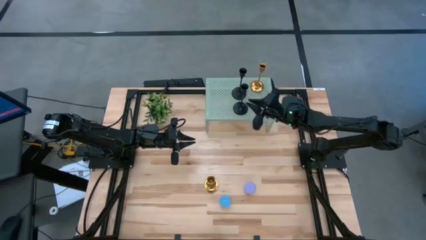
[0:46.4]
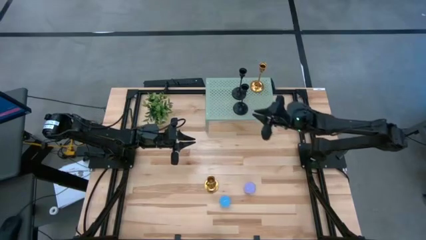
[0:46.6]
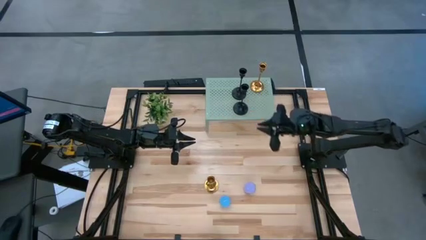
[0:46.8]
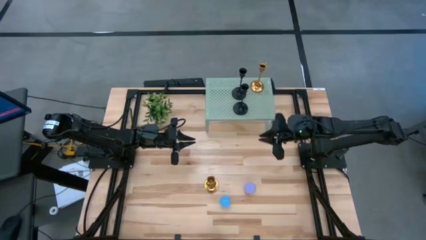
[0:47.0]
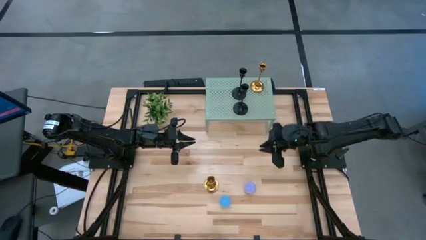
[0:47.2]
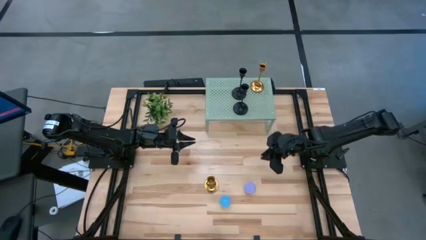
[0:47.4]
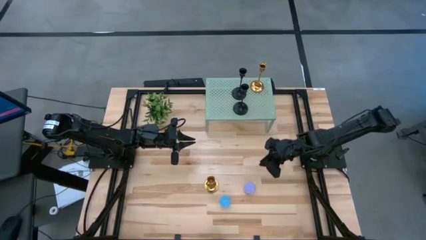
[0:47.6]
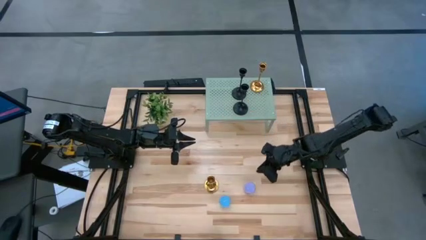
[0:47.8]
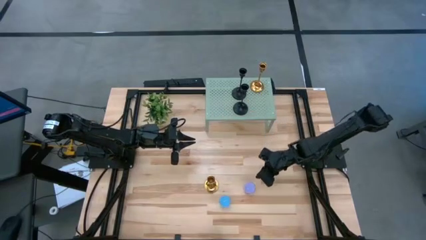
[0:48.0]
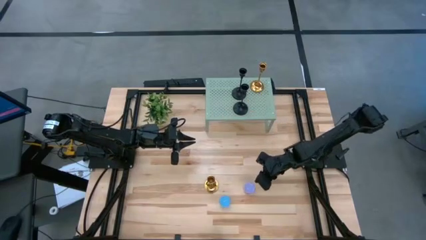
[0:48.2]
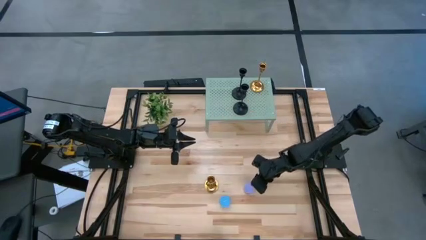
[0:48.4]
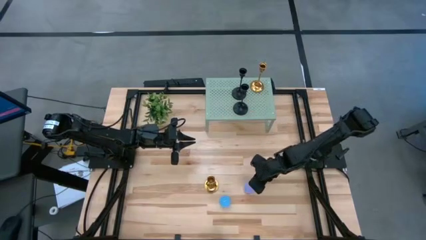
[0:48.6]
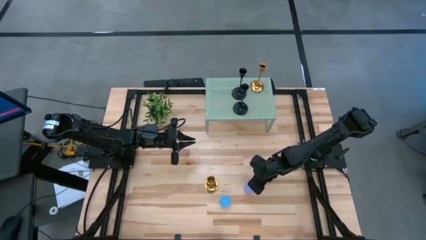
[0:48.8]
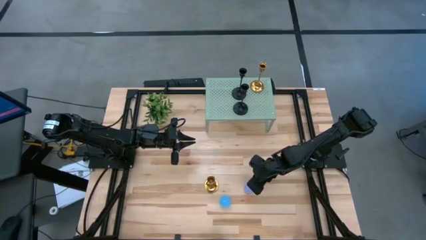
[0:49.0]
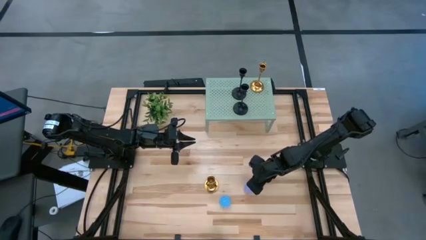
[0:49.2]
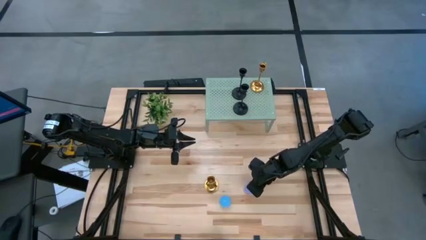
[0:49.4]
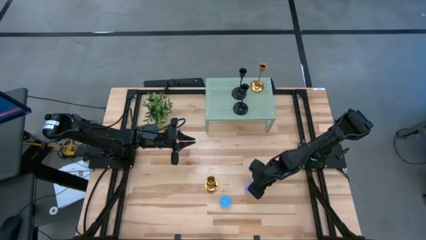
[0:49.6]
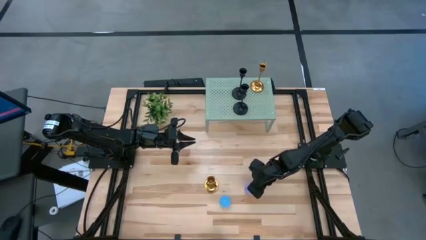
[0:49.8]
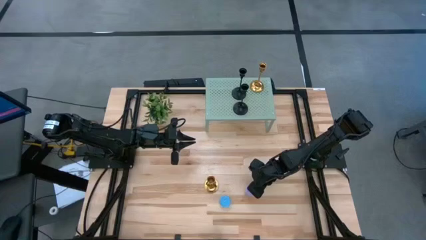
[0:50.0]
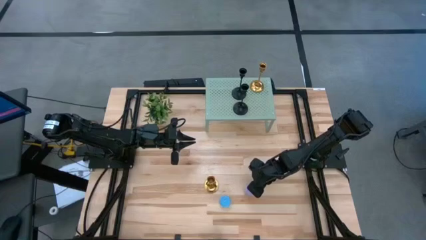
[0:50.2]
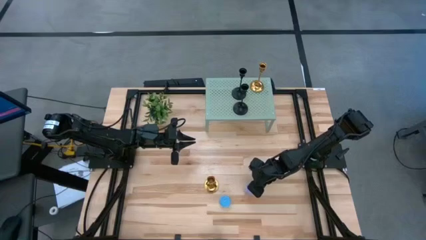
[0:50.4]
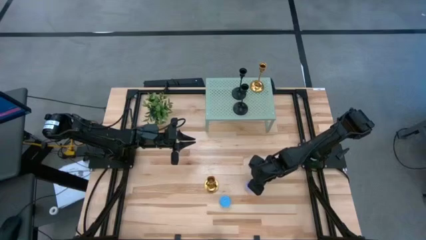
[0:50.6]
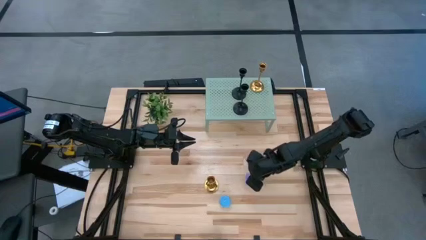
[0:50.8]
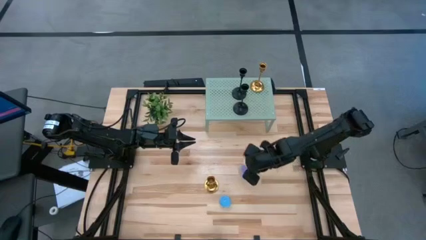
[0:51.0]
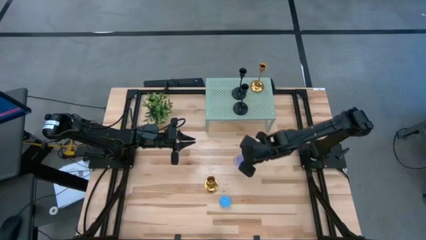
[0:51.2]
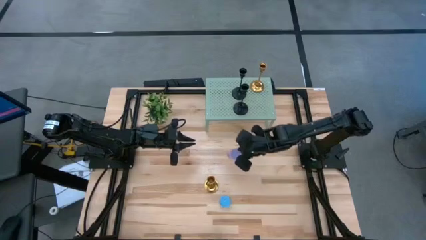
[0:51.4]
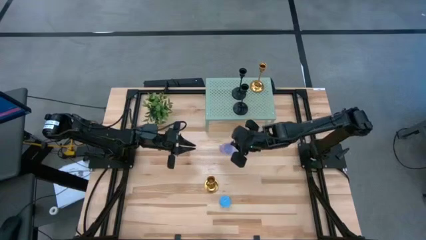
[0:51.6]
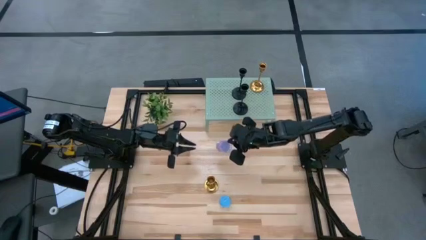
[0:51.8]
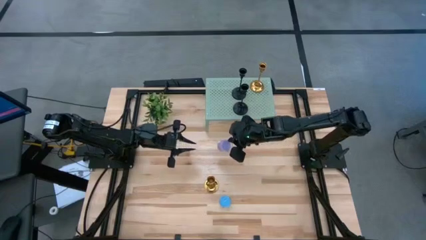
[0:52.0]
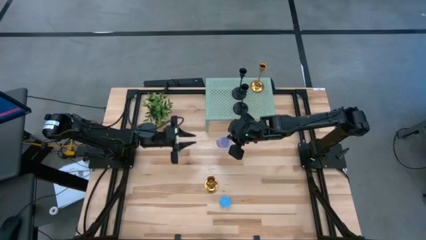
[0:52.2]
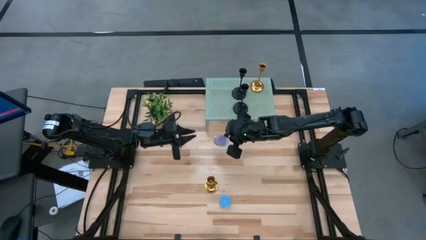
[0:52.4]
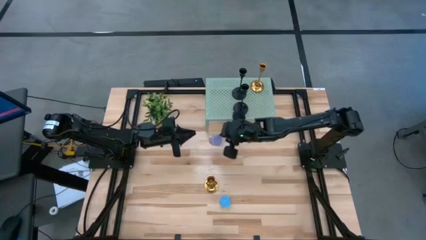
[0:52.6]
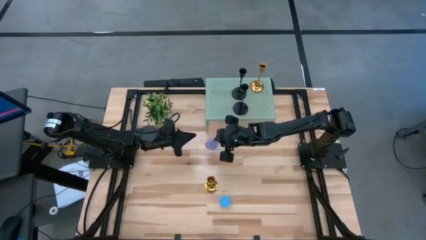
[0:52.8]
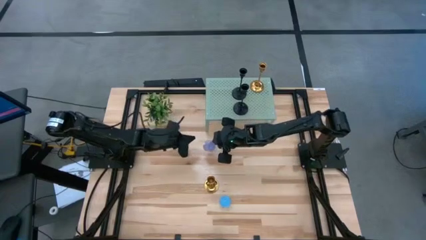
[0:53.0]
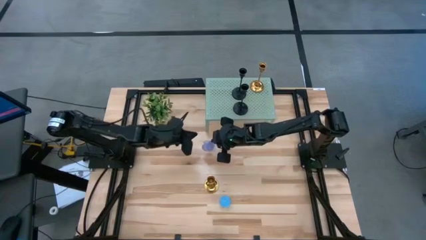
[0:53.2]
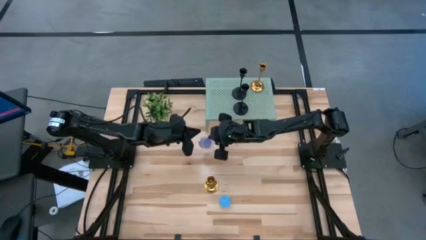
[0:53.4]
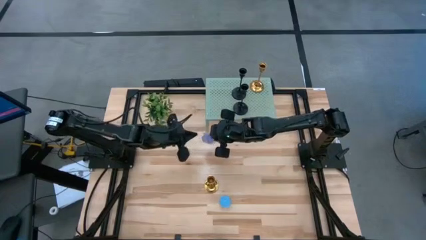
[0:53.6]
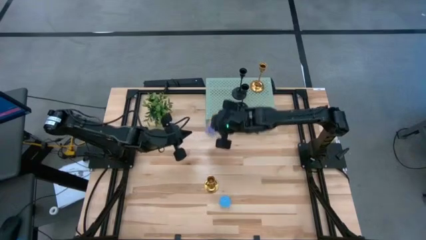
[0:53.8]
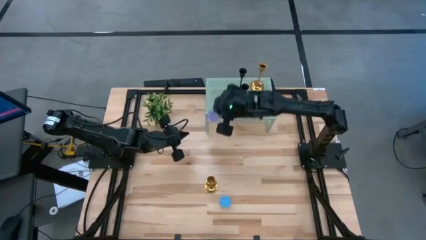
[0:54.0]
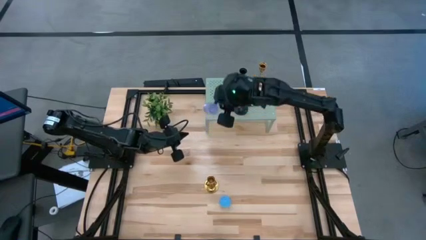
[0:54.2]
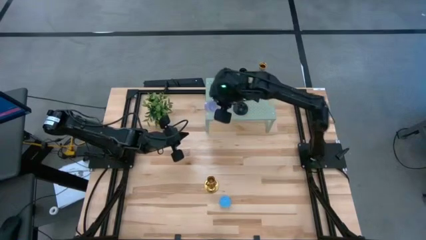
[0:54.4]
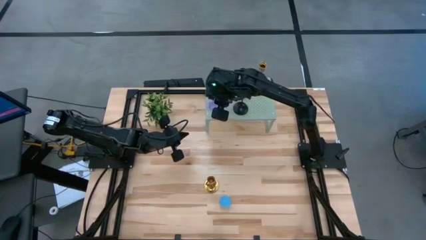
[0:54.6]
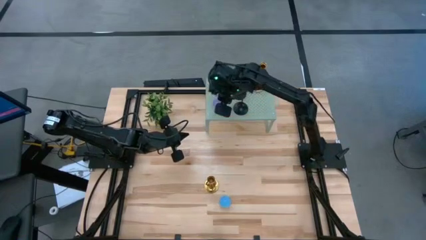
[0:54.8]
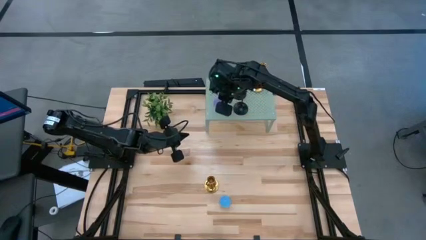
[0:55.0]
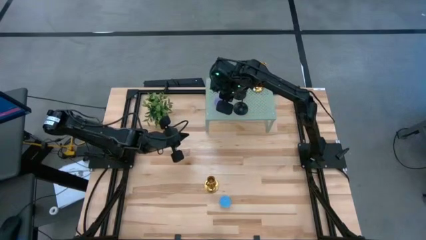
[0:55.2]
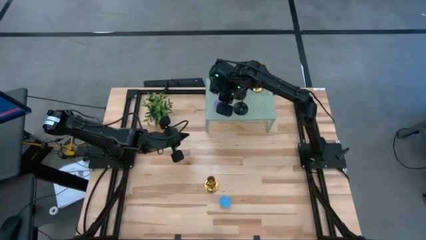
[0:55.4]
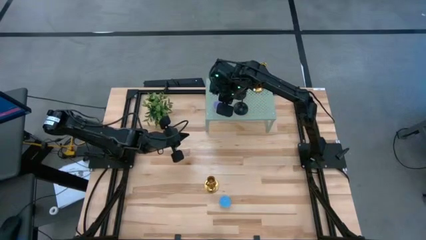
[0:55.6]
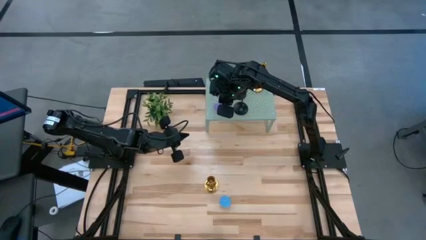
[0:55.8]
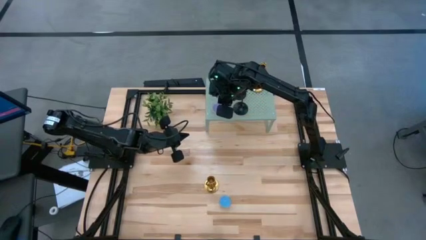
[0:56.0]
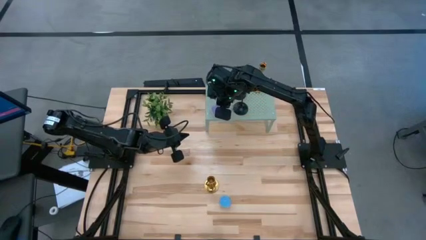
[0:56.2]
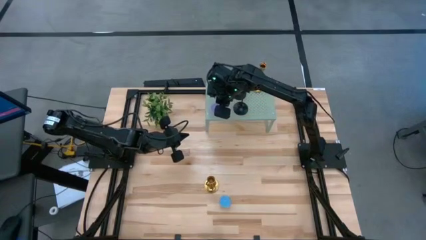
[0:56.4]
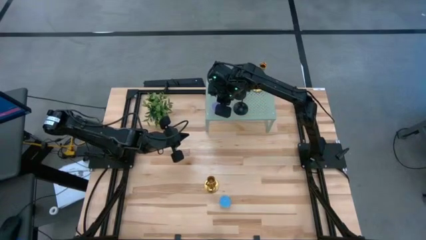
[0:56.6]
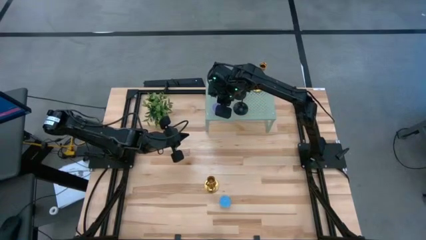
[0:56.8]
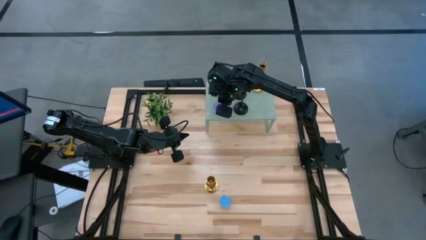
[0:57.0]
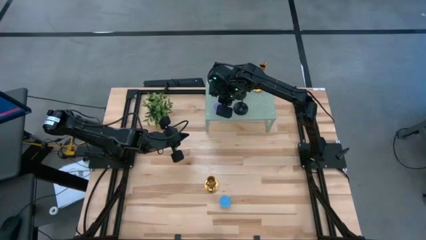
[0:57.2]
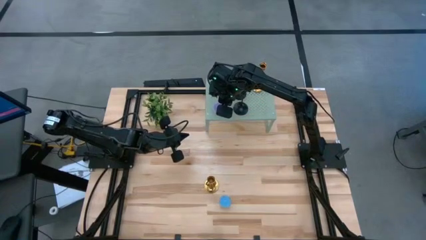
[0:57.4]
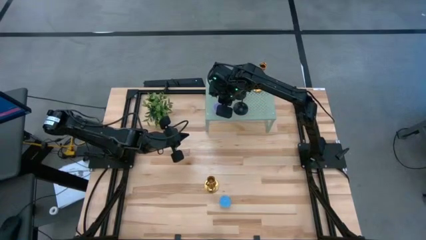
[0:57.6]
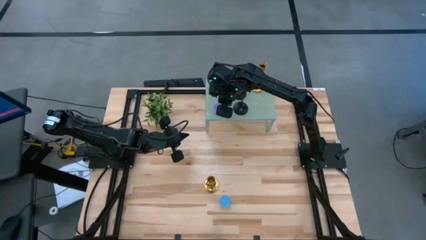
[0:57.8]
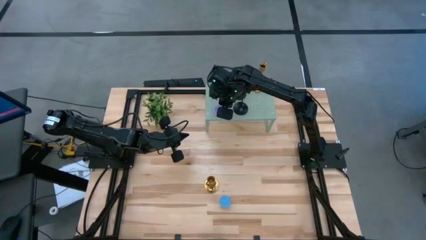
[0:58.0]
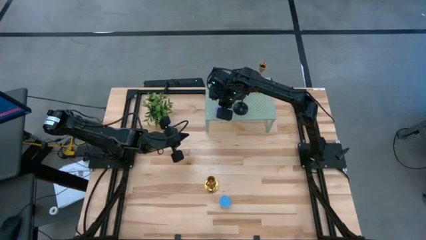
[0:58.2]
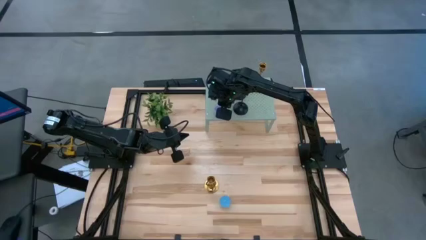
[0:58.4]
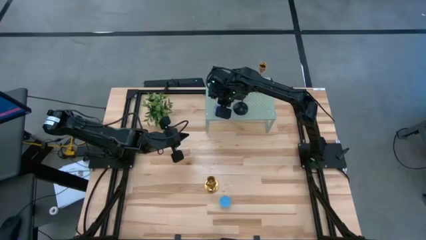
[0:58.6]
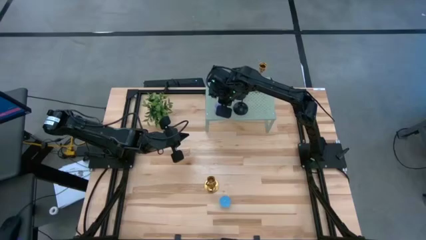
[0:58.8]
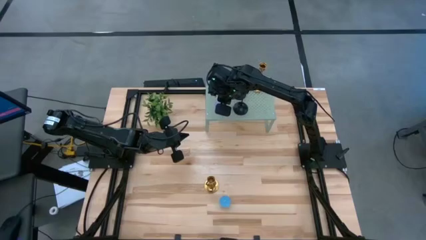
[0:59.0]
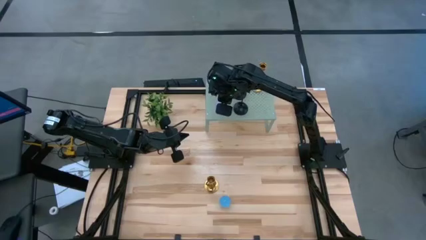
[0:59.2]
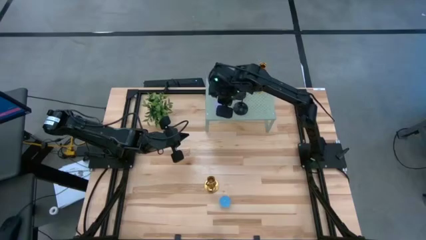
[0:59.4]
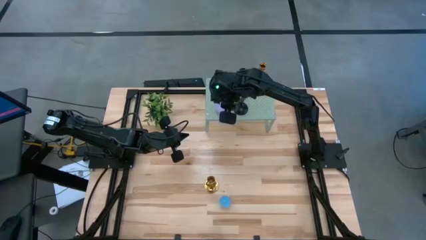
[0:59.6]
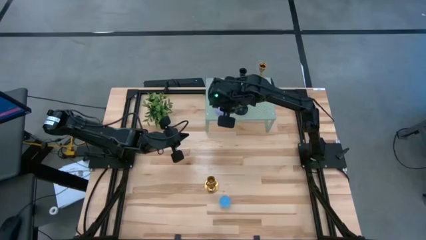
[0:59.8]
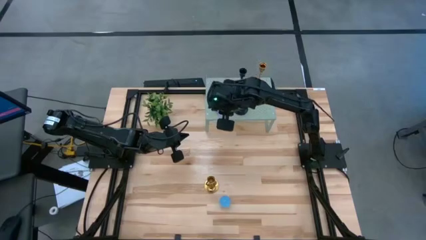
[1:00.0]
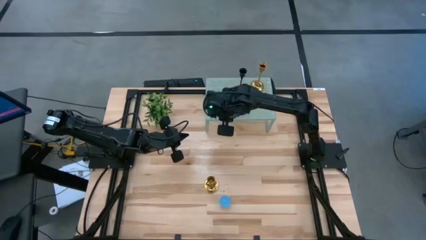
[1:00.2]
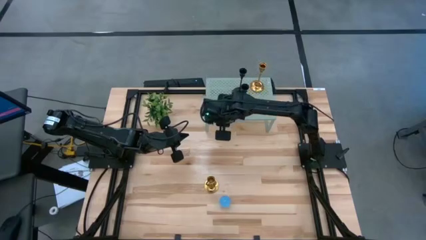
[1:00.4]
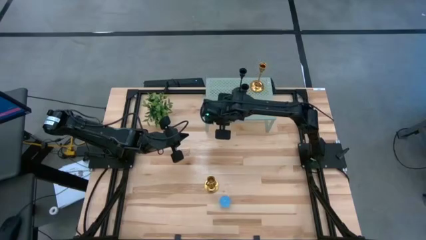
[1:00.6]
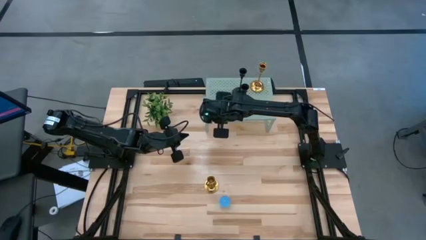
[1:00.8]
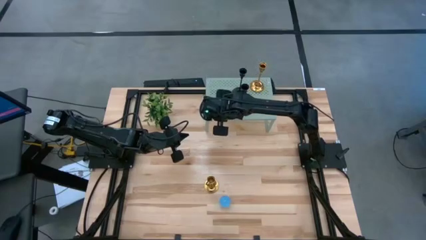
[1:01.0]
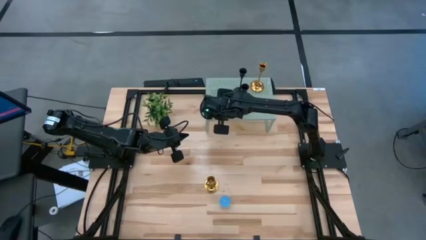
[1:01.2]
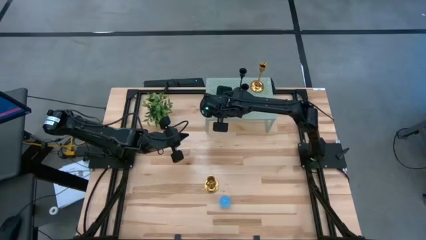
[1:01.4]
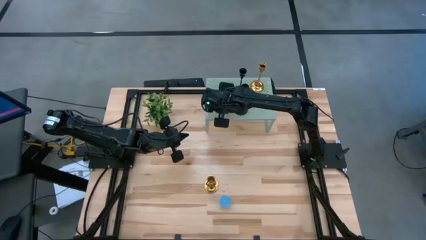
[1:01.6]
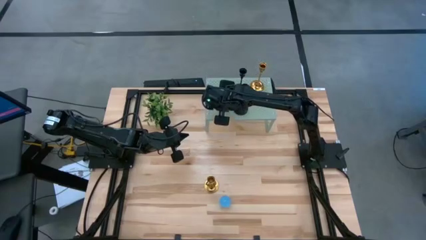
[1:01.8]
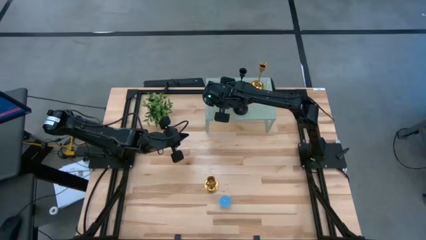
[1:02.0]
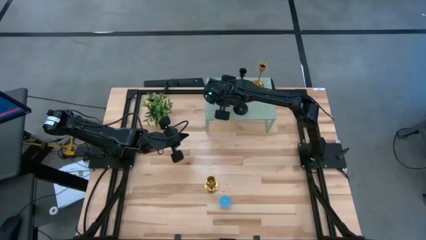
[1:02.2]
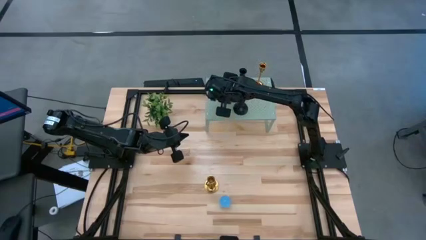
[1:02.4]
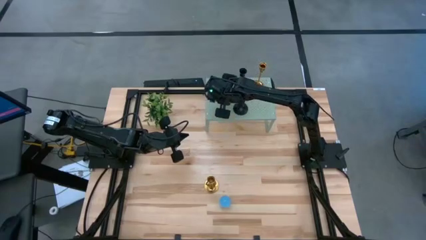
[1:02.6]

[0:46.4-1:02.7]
Task: Pick & Place candle stick holders
Put the violet candle on the shelf
